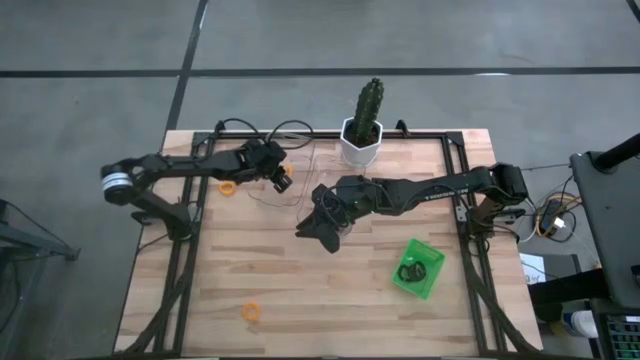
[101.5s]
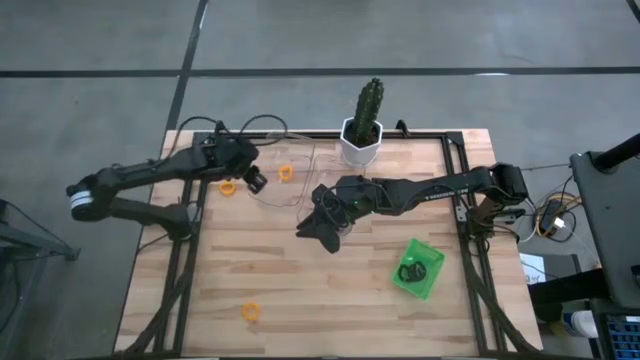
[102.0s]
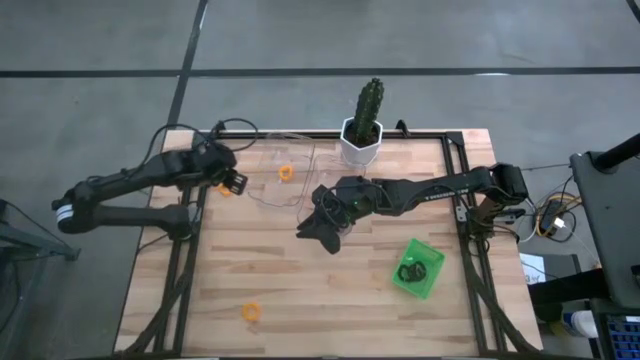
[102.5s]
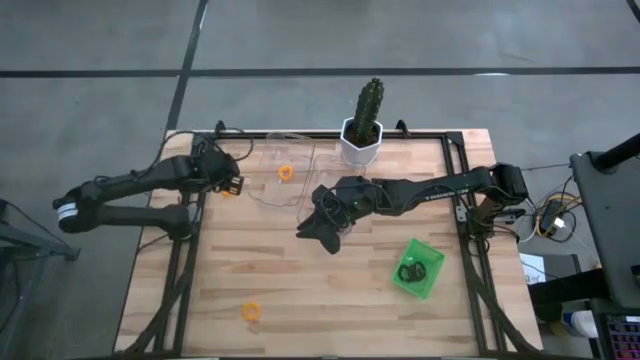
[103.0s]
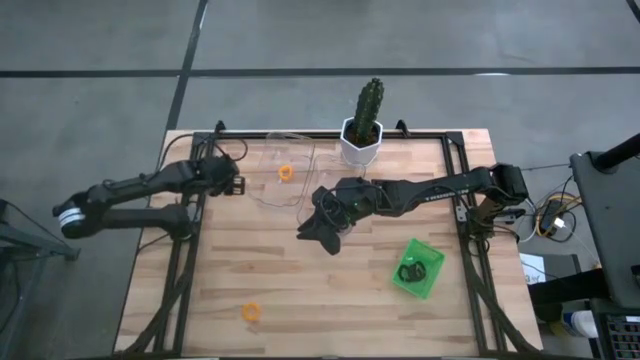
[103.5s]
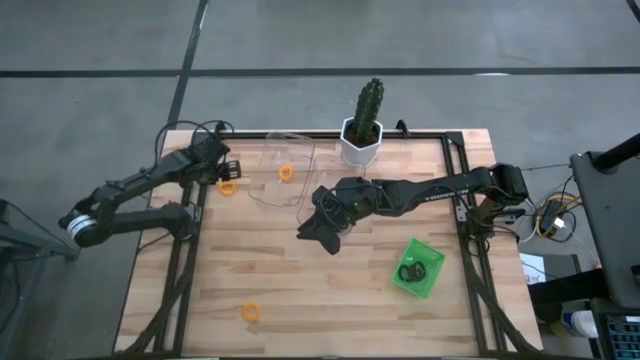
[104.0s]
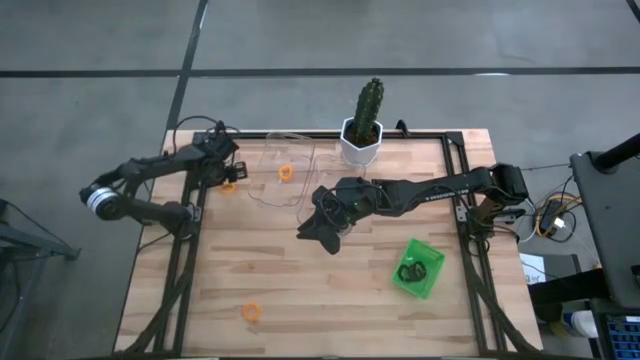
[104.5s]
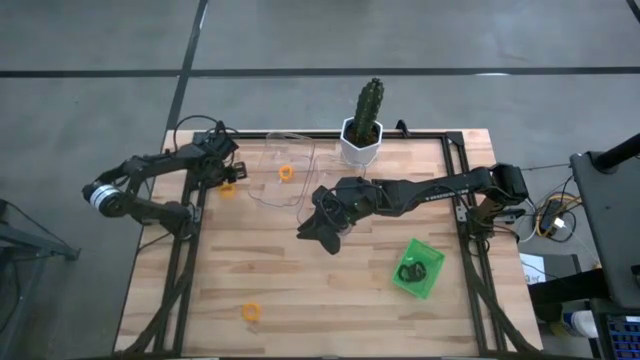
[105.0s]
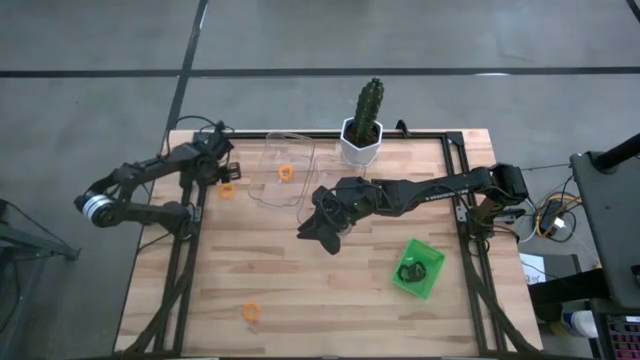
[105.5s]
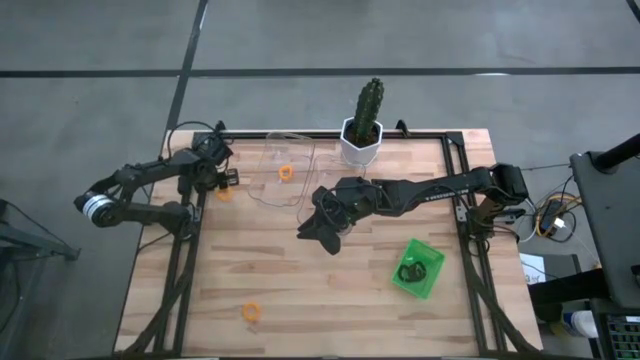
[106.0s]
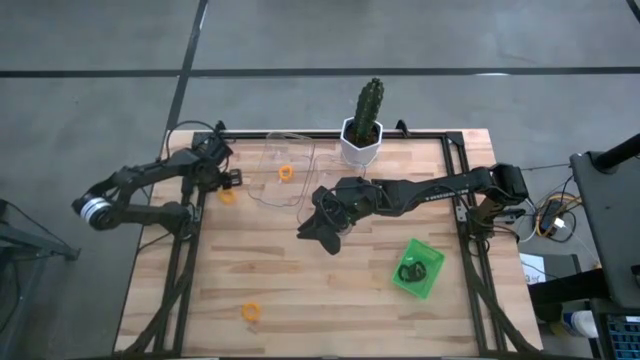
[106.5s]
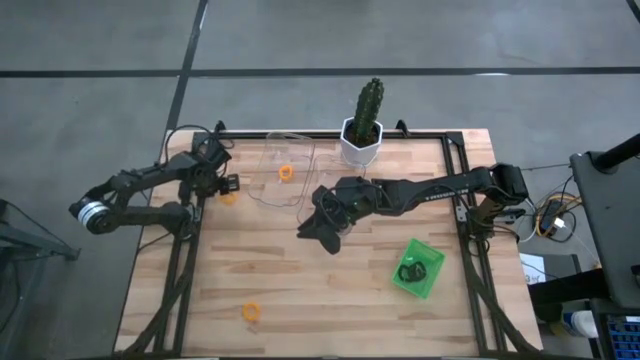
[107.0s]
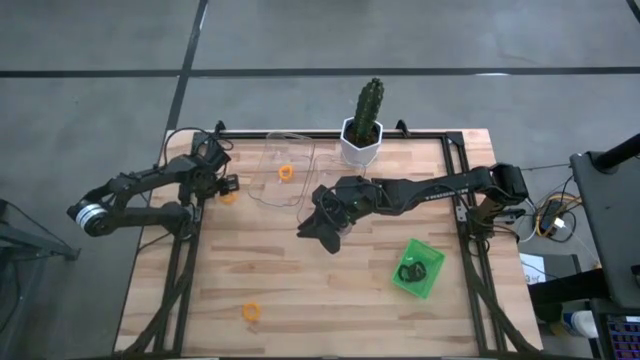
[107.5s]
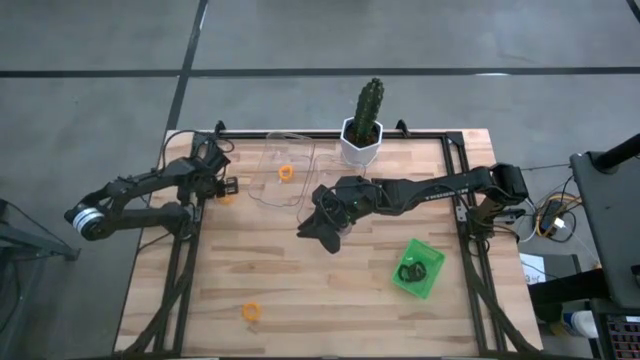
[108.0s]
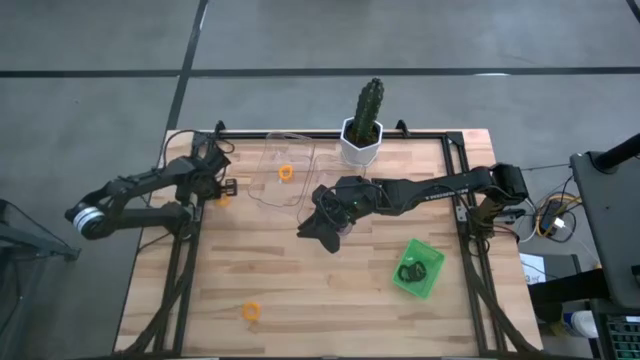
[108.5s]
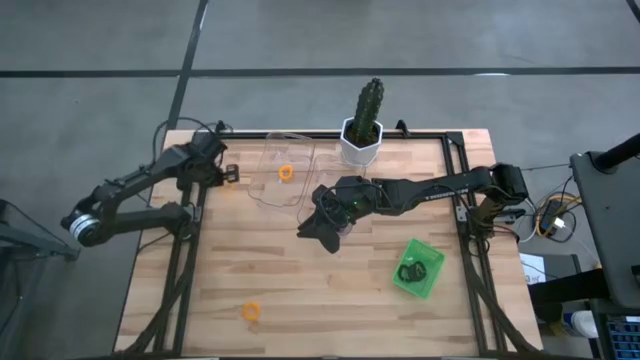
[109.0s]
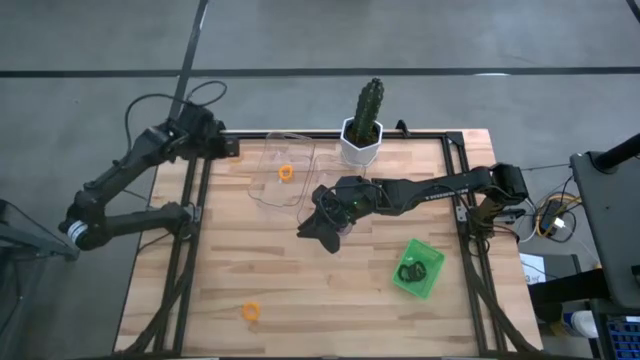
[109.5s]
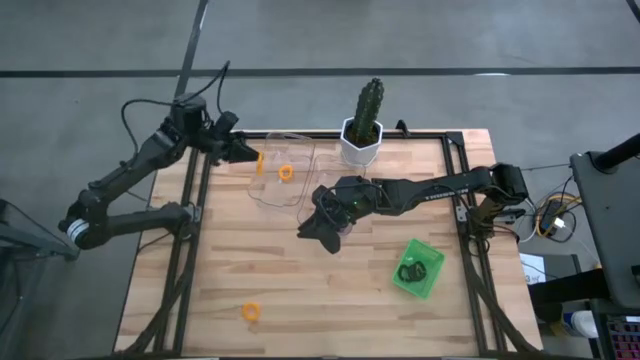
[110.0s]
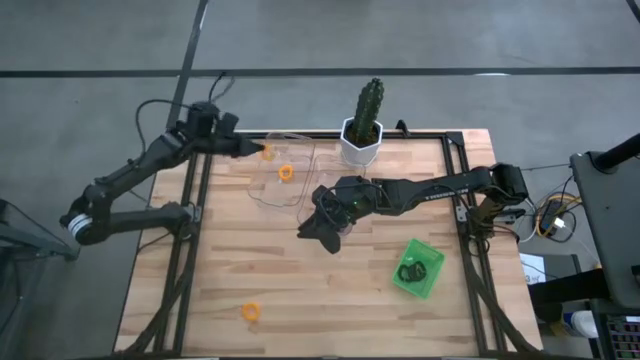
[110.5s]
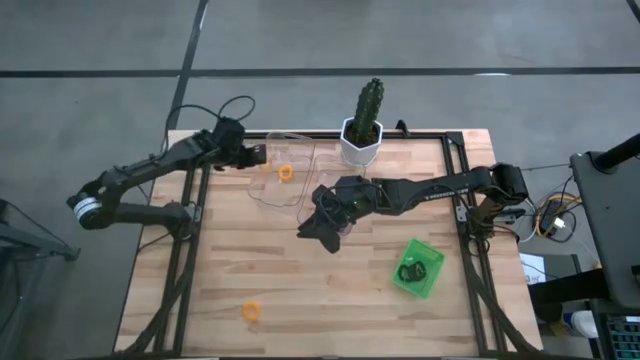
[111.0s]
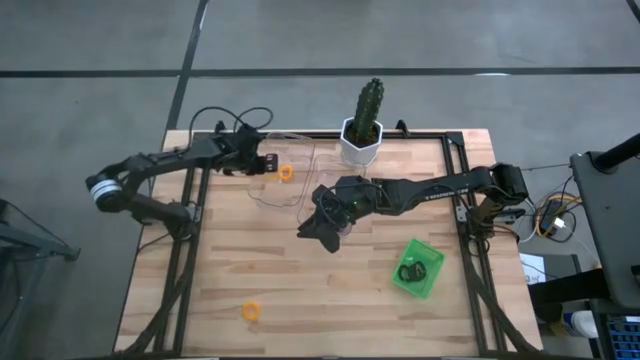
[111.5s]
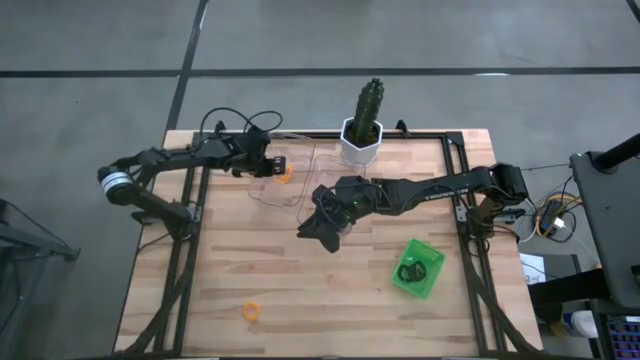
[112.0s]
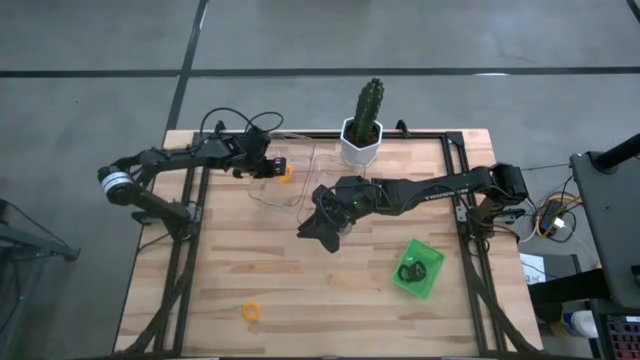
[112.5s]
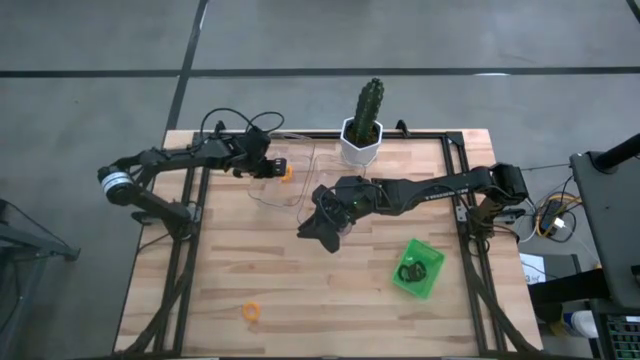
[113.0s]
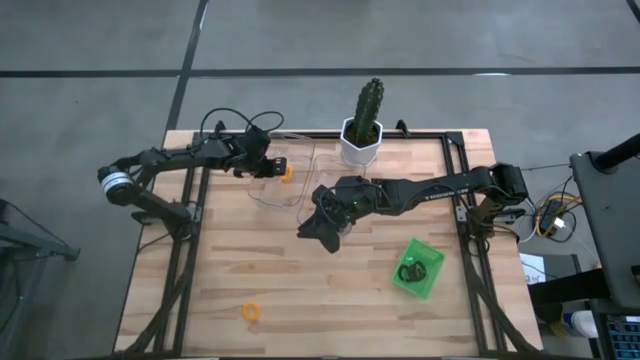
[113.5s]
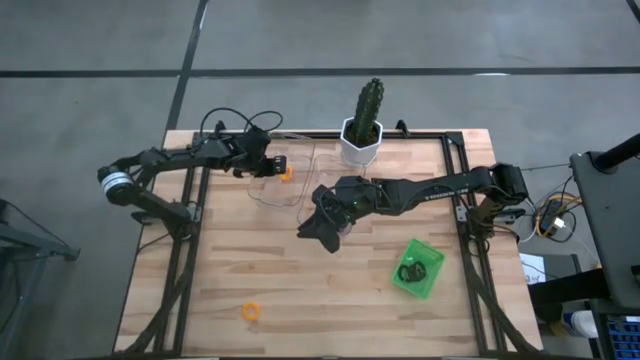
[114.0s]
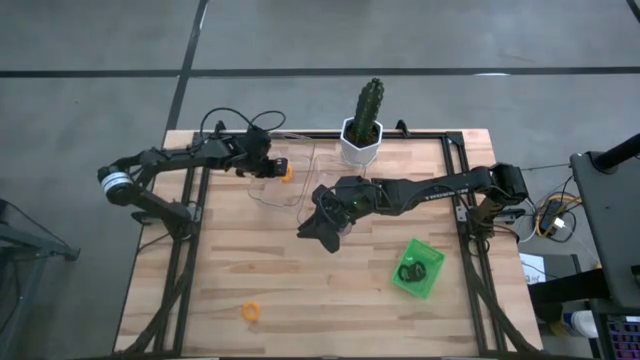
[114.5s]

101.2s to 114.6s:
Task: Sort spring keychains
Put the top yellow spring keychain into the left transparent bin

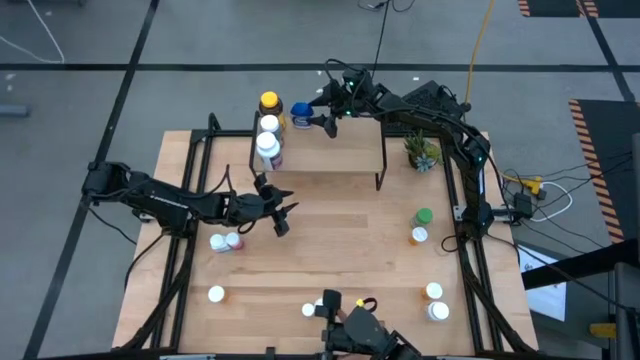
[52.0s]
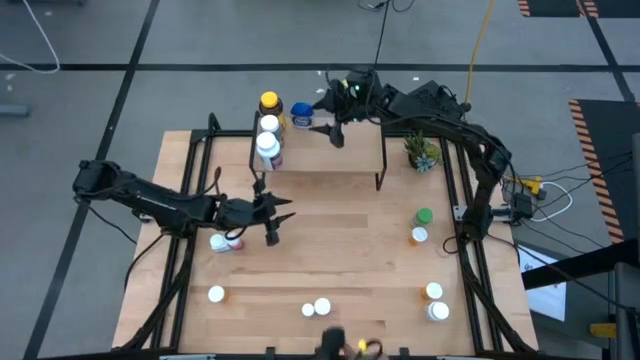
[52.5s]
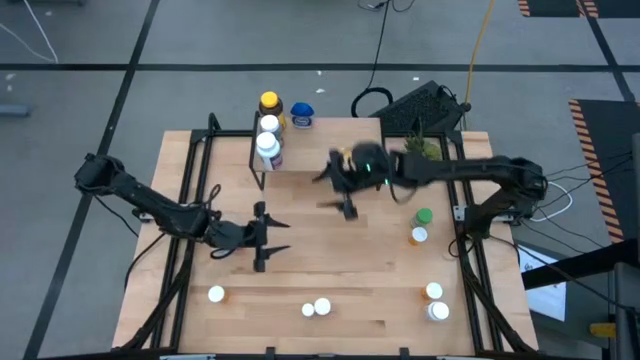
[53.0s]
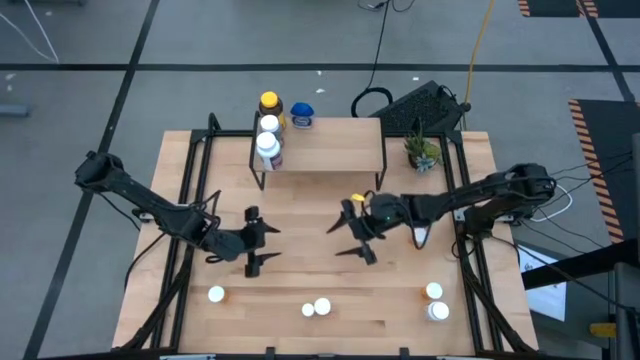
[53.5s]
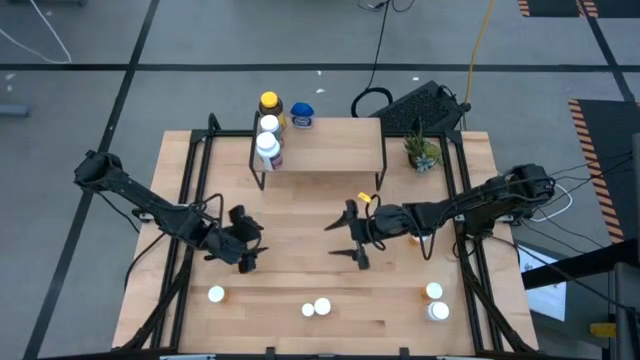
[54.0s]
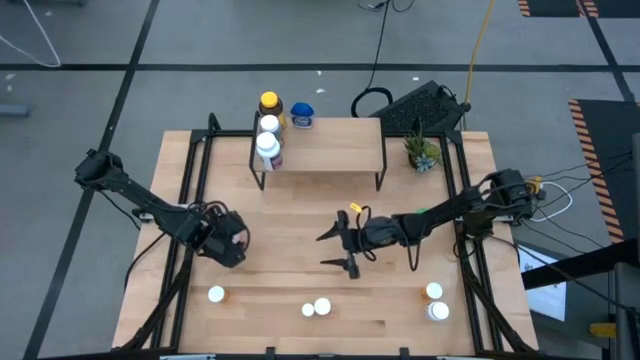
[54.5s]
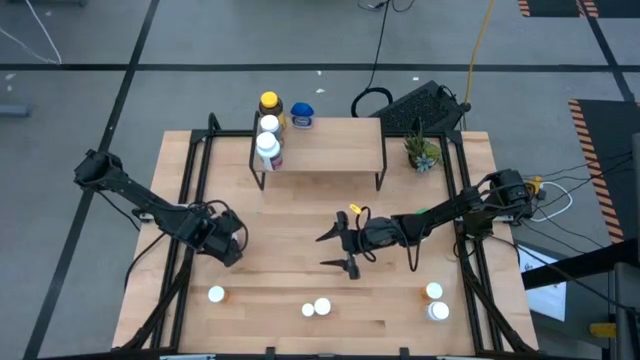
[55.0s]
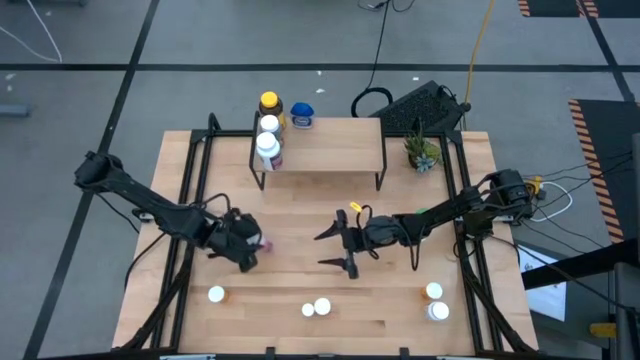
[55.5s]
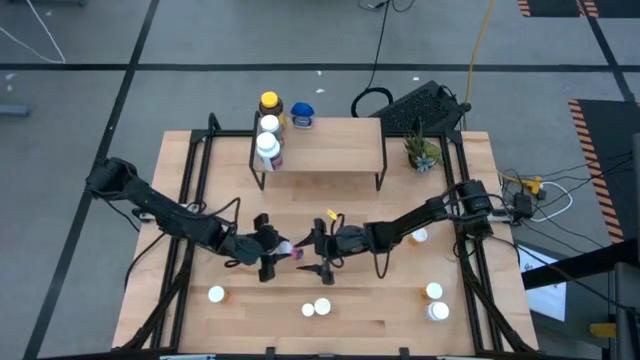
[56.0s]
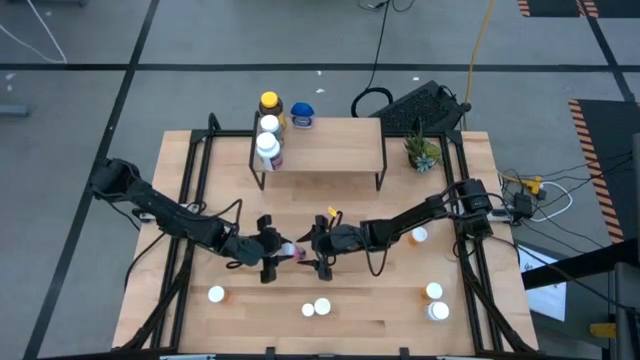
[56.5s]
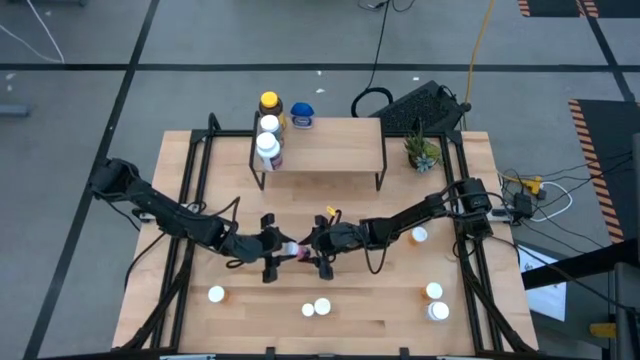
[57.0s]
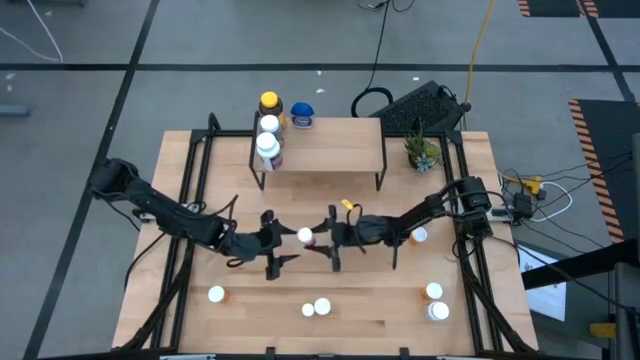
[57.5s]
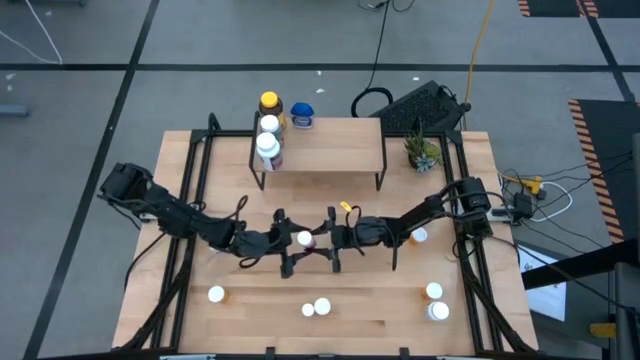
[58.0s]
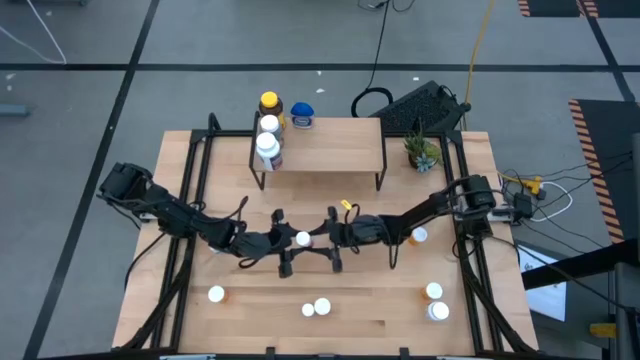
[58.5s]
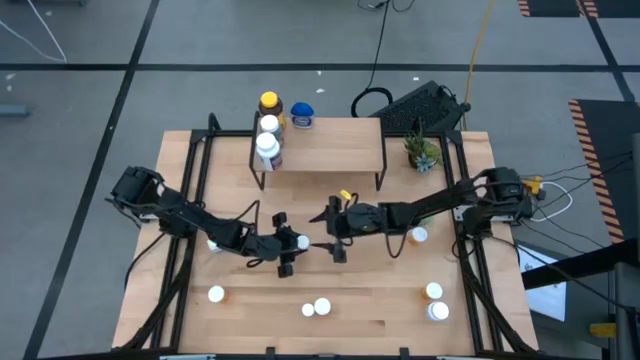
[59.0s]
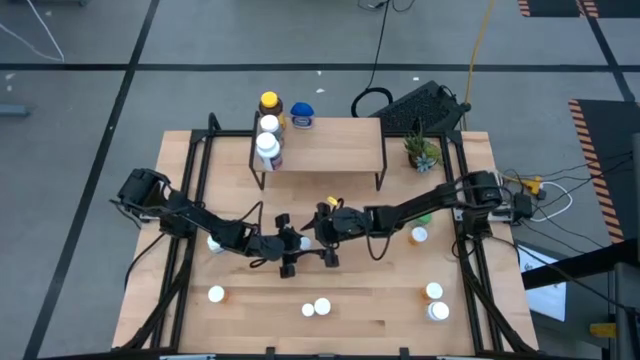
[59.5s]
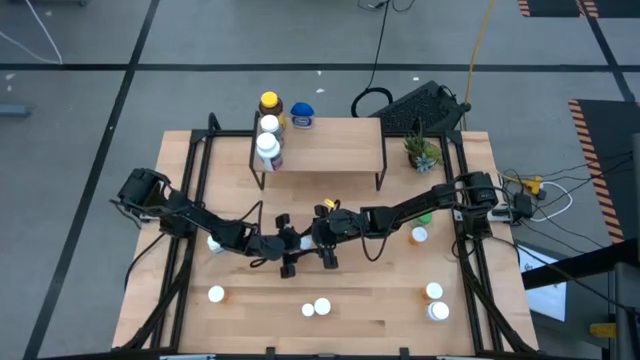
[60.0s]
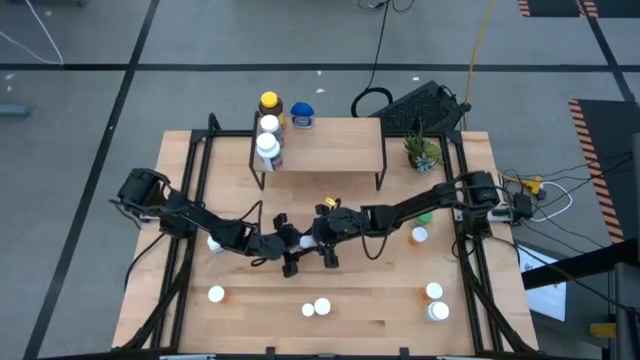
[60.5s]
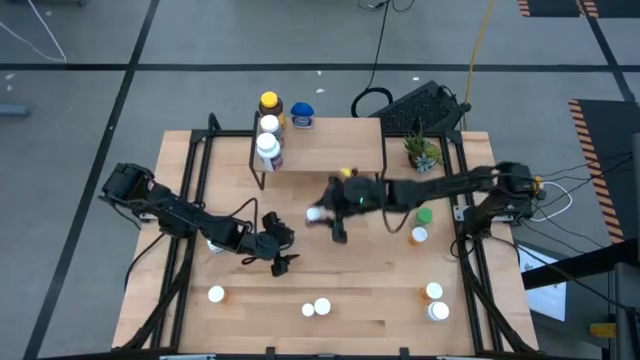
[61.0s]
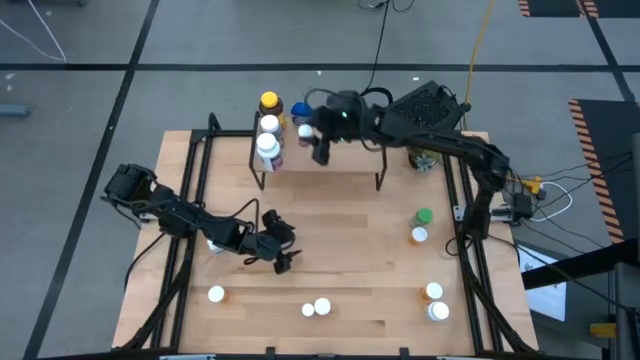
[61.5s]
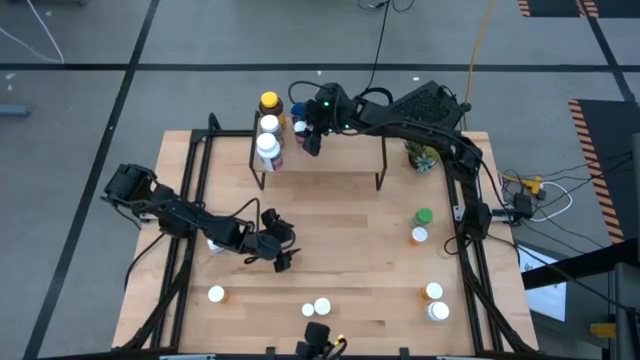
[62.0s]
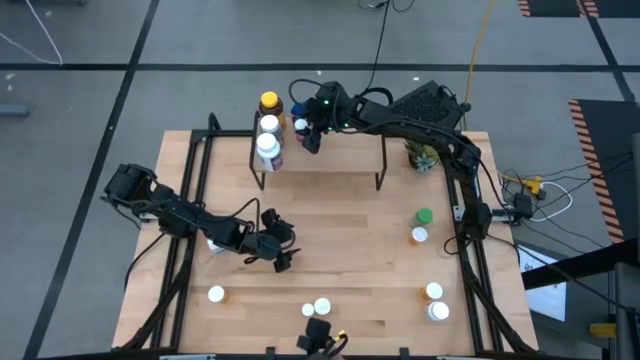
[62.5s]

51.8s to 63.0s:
Task: Pick and place medicine bottles onto shelf by color
Put the pink medicine bottle on the shelf, aligned with the blue medicine bottle
